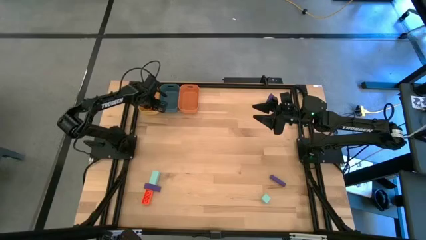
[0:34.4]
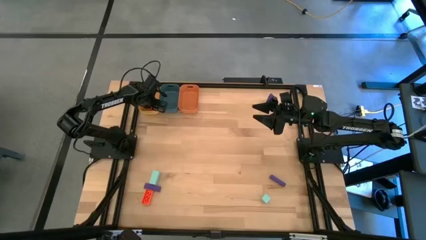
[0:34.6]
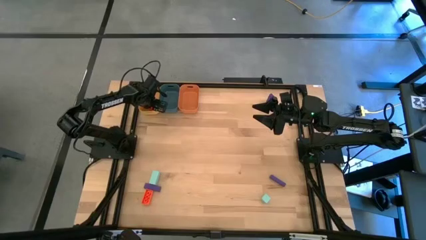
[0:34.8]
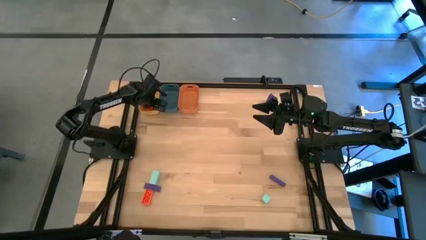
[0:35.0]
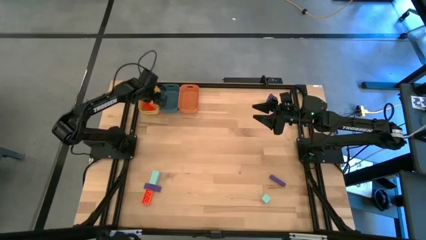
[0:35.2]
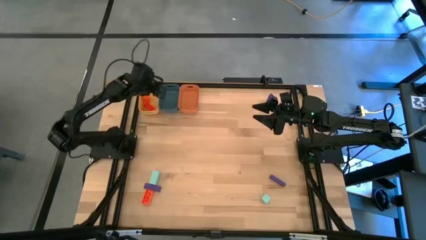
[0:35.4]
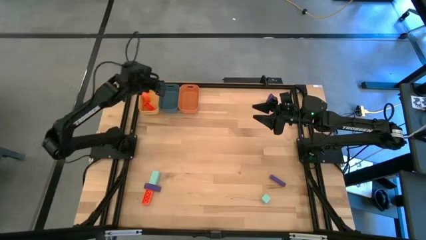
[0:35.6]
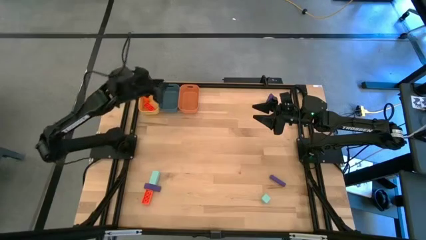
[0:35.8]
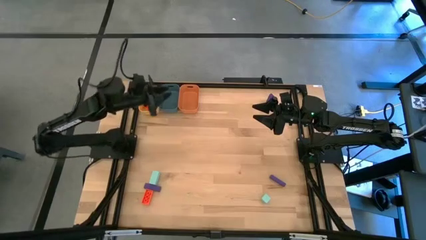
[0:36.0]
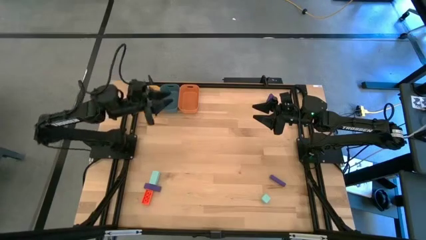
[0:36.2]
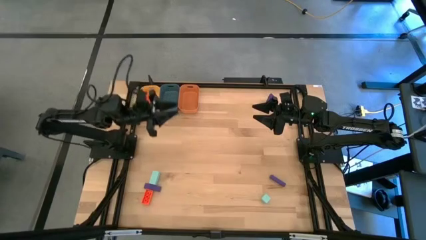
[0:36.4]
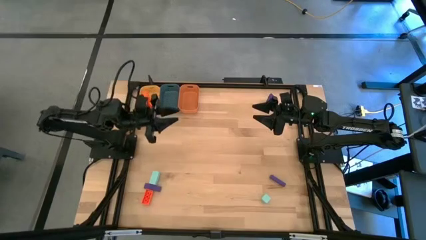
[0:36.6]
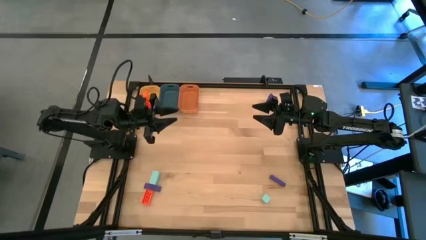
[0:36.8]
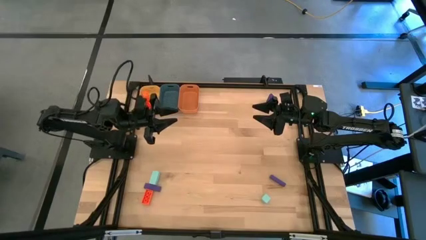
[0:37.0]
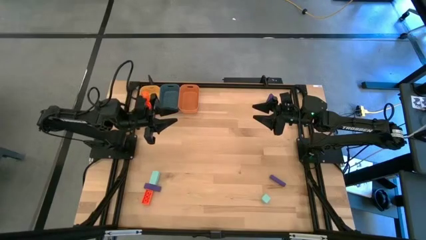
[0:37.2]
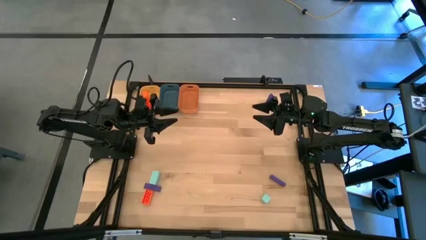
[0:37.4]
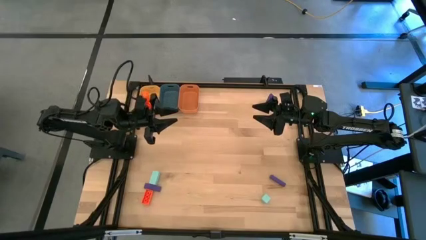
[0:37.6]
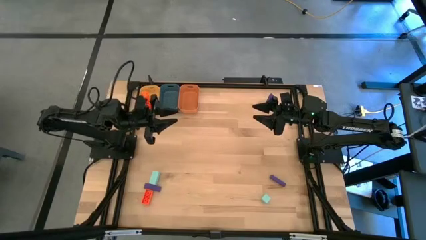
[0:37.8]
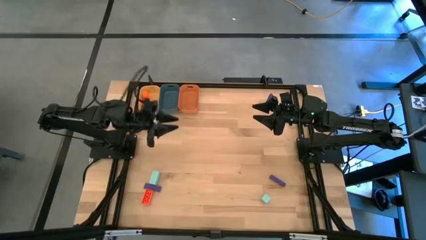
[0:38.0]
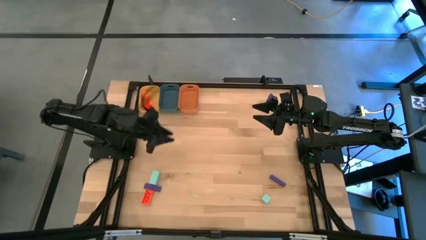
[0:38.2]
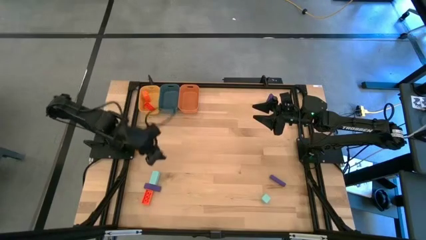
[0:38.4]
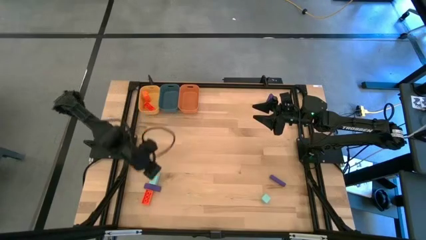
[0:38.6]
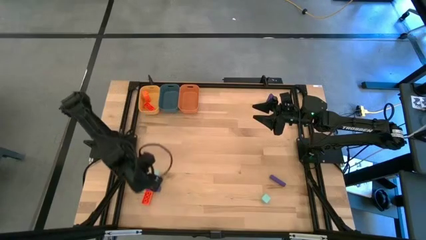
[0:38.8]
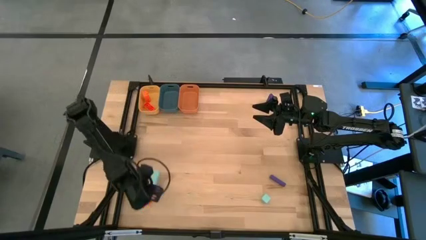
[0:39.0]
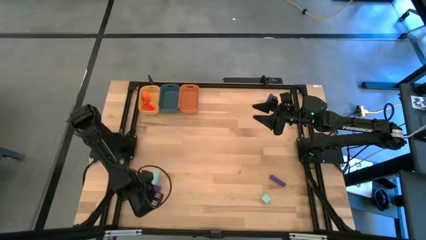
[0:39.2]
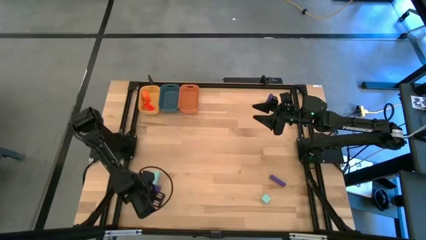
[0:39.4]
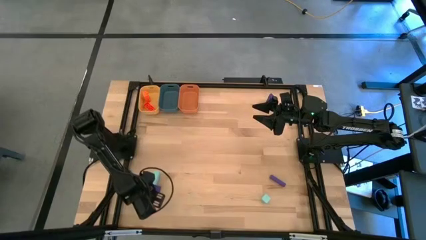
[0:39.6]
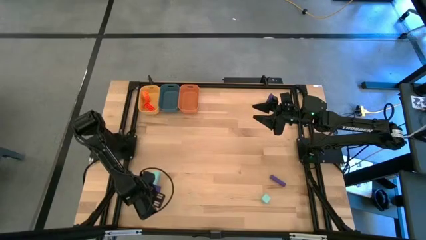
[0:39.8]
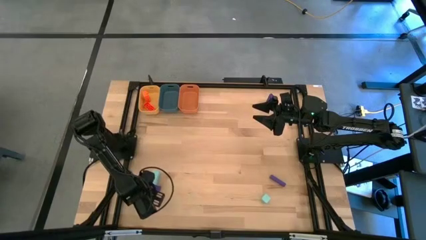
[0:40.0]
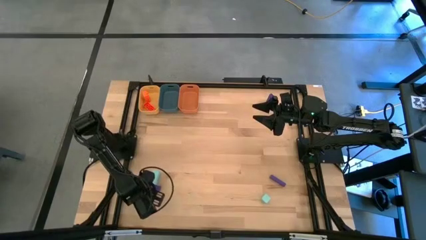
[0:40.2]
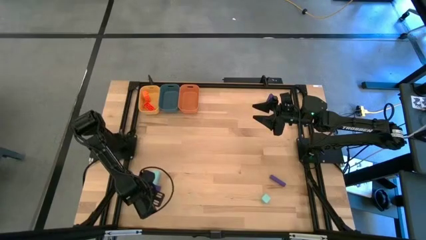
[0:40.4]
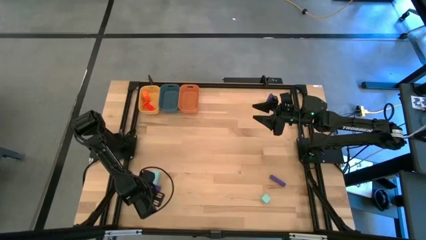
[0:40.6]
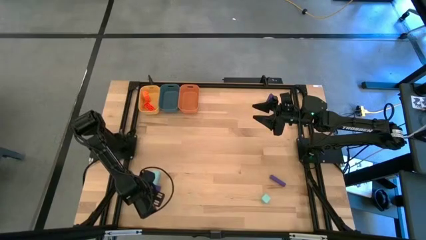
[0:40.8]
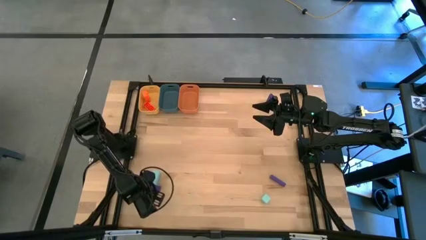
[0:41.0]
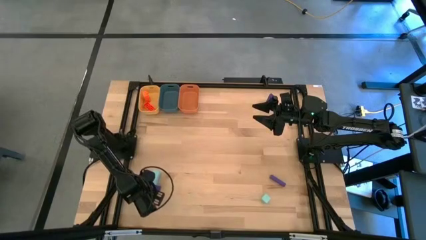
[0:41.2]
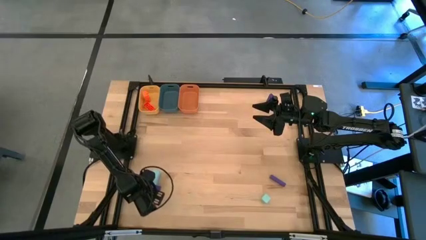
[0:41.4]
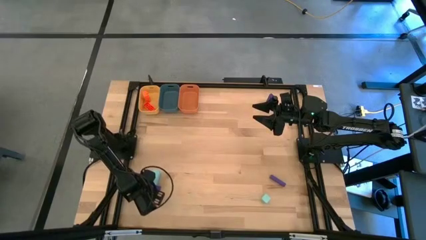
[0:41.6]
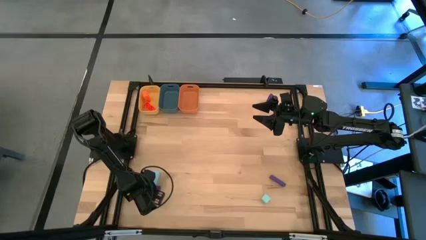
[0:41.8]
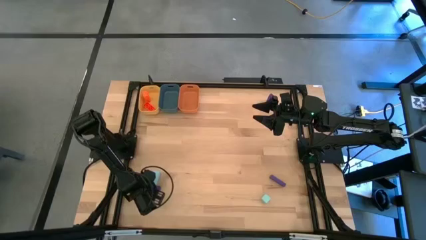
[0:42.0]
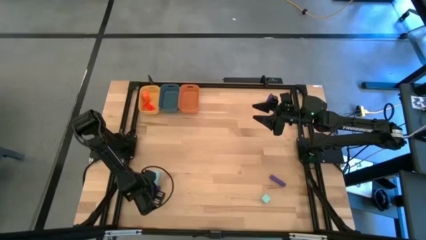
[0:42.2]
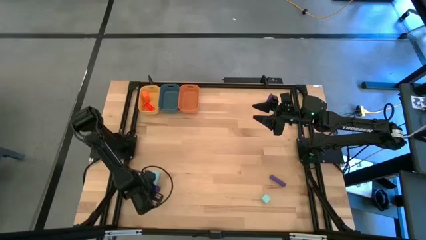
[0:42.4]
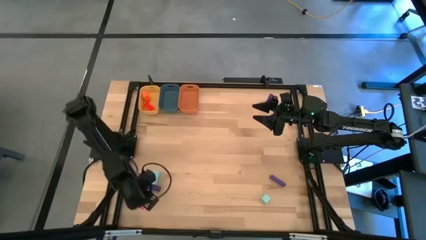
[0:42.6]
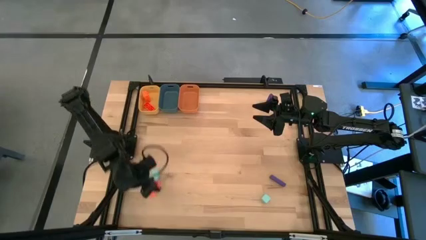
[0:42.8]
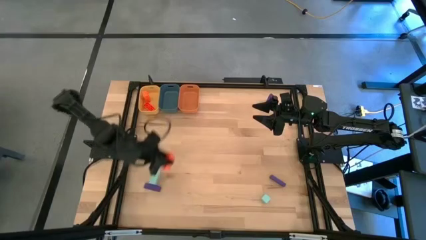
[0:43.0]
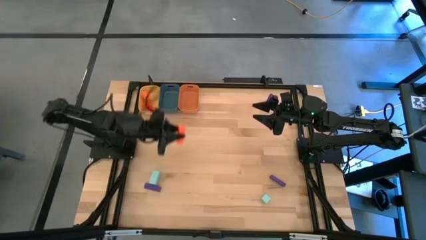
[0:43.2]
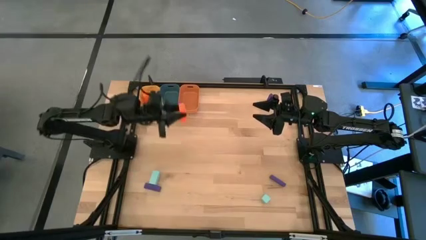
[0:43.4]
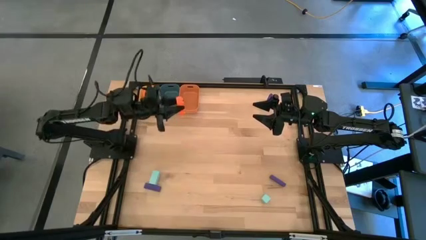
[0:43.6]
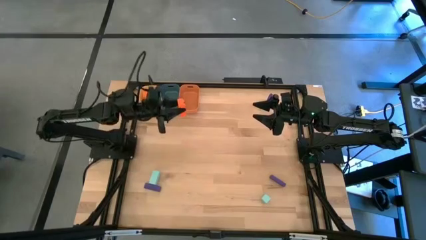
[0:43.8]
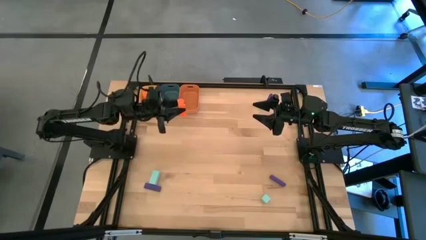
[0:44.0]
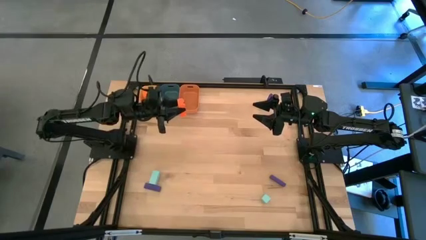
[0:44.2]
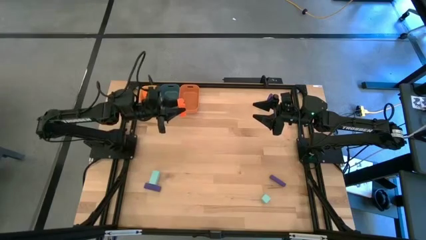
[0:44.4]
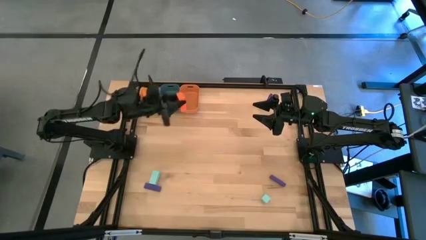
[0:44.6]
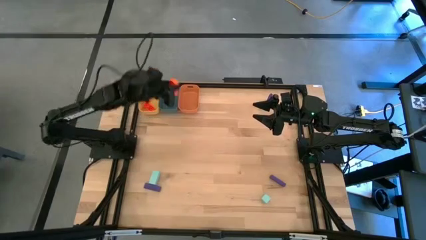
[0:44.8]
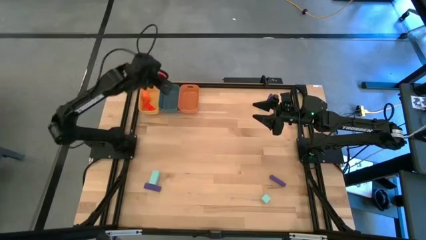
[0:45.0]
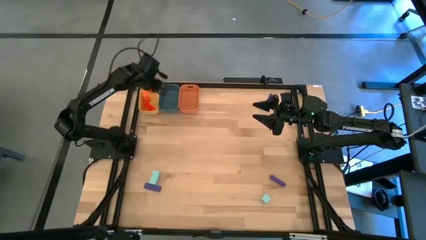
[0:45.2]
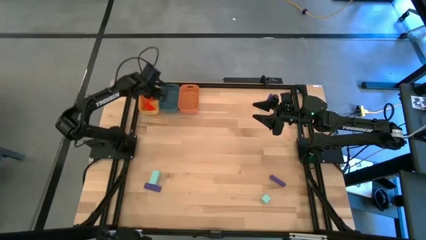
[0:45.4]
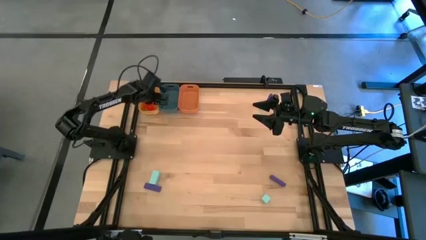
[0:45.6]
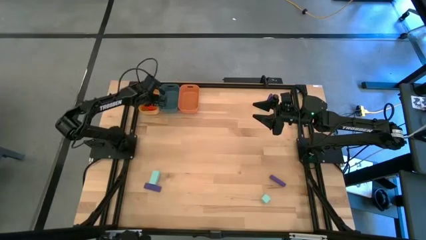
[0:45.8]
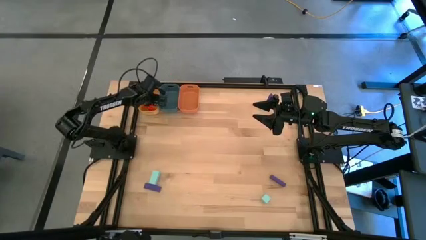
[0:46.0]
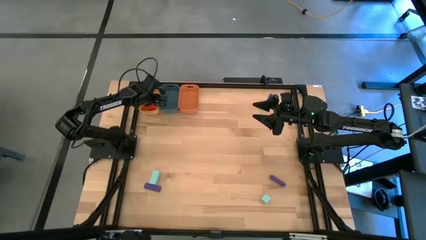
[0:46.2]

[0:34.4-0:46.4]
Task: Sort & place blocks by color
Put the orange game piece into the yellow bin

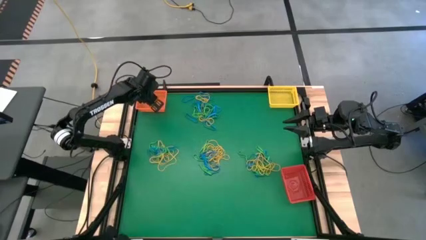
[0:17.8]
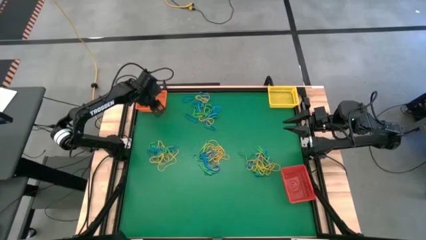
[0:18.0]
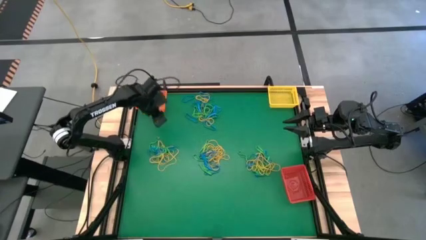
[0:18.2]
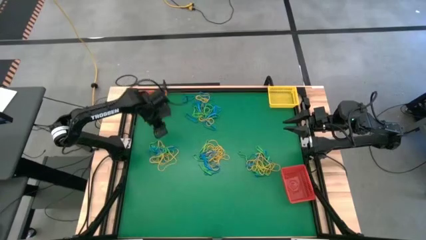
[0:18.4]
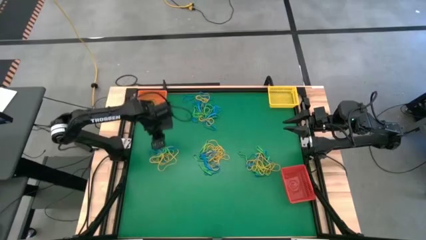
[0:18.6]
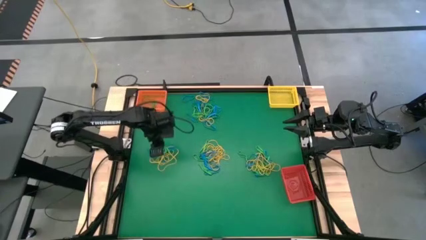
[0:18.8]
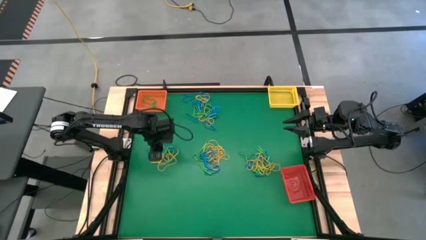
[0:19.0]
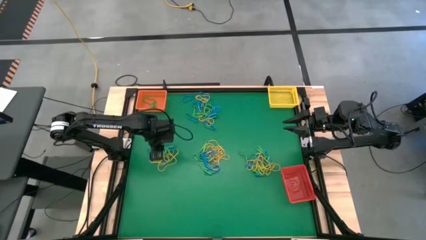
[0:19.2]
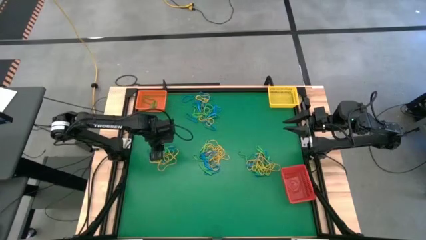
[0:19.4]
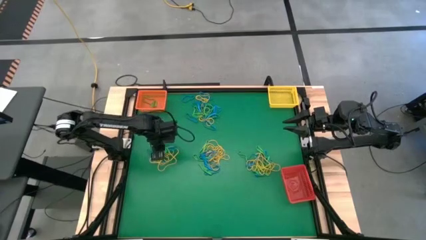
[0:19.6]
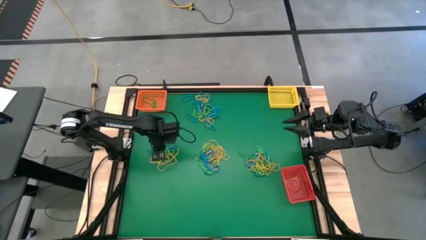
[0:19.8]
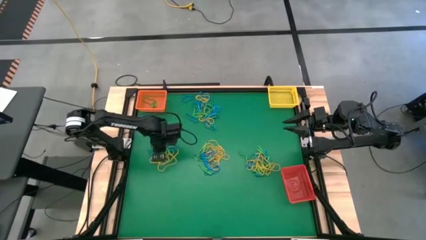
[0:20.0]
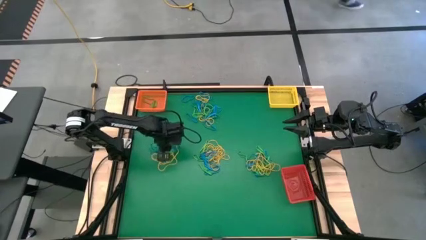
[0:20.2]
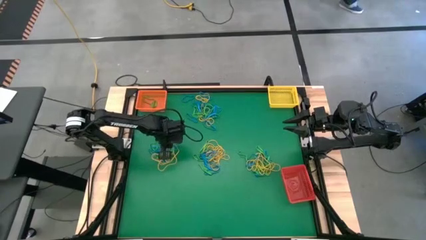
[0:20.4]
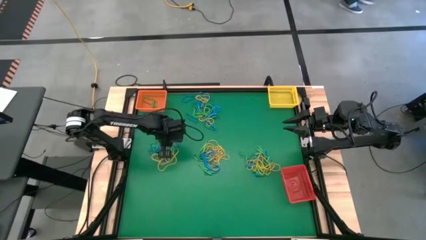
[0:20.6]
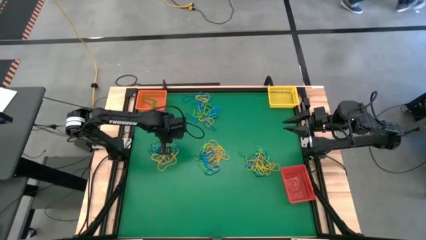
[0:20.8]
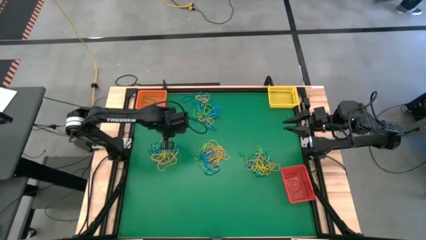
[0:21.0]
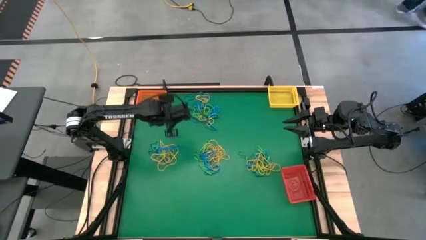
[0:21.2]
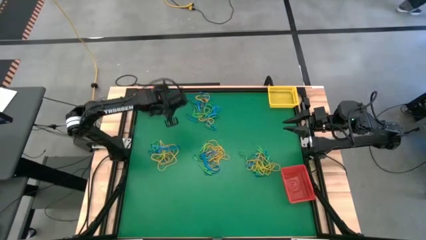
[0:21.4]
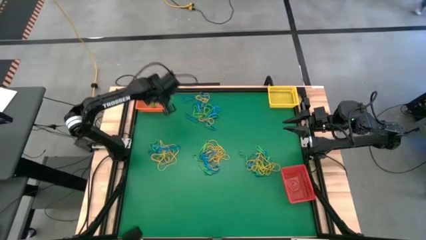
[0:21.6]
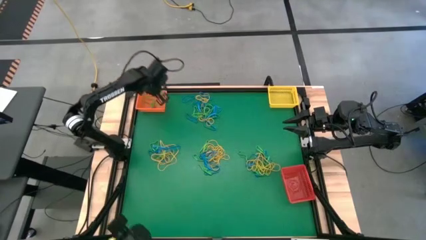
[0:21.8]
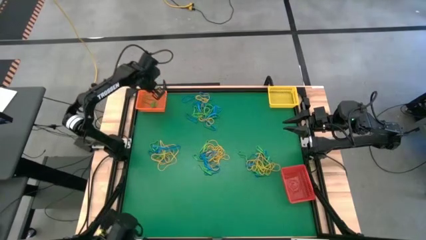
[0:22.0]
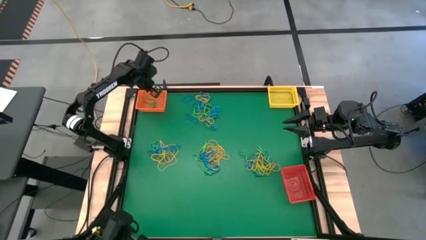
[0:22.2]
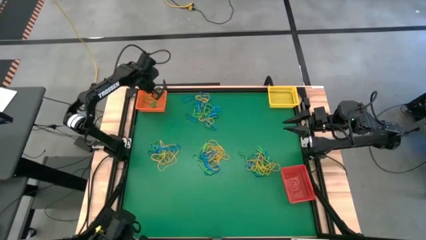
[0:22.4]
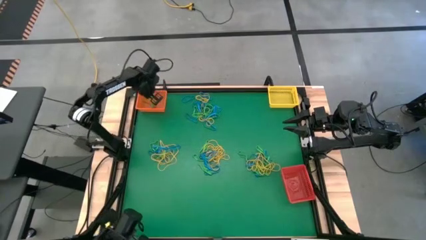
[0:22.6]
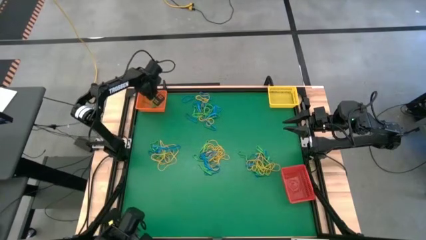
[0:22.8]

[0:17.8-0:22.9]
Task: Sort rubber bands into baskets
Put the green rubber band into the orange bin
